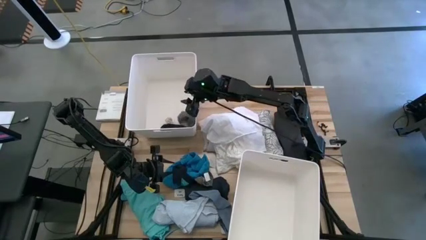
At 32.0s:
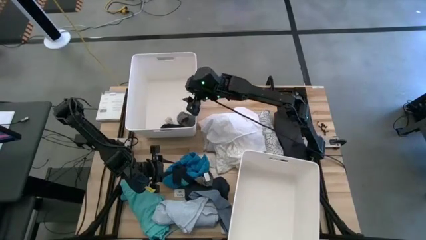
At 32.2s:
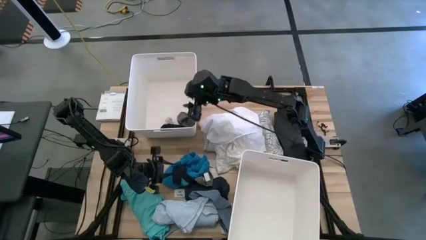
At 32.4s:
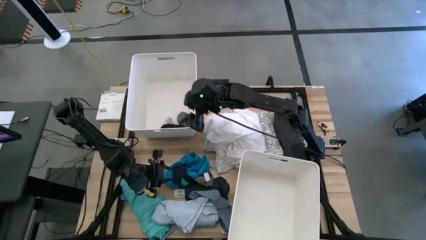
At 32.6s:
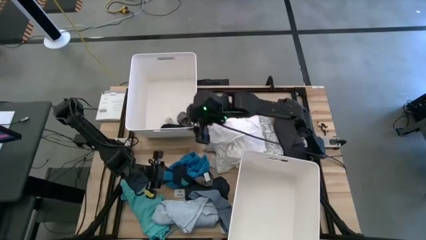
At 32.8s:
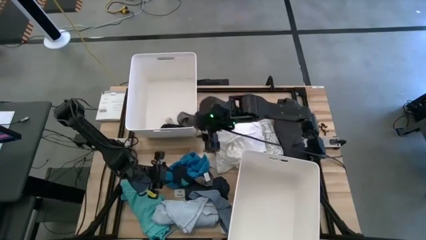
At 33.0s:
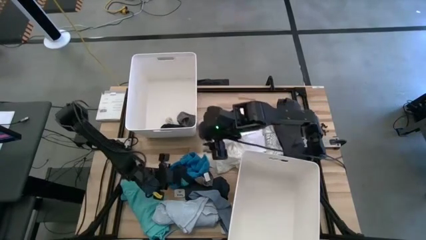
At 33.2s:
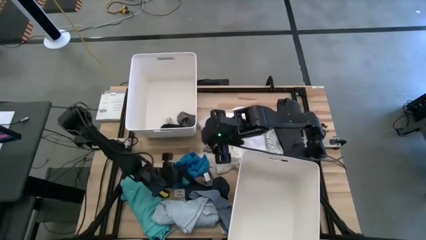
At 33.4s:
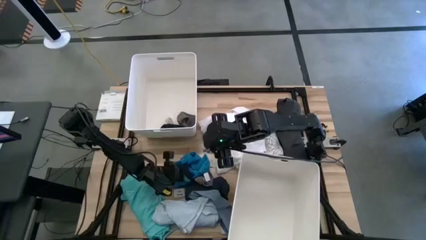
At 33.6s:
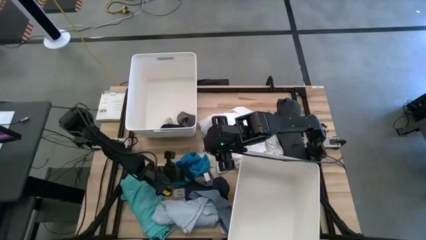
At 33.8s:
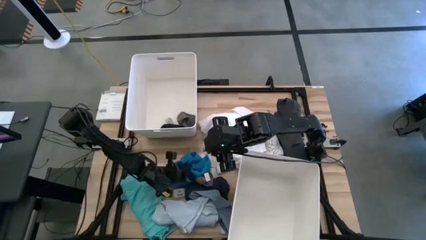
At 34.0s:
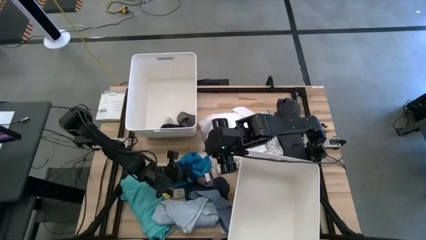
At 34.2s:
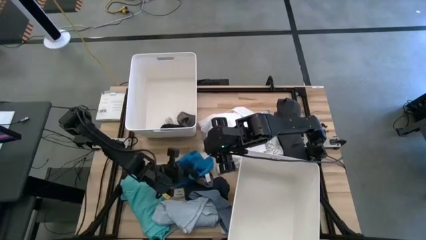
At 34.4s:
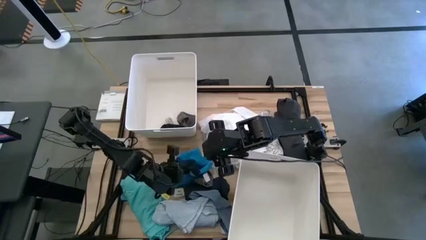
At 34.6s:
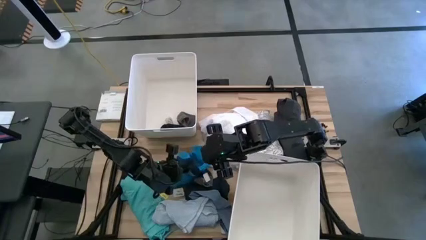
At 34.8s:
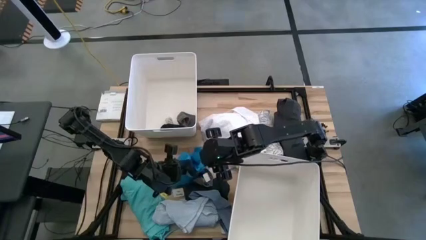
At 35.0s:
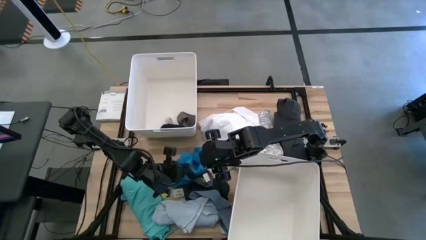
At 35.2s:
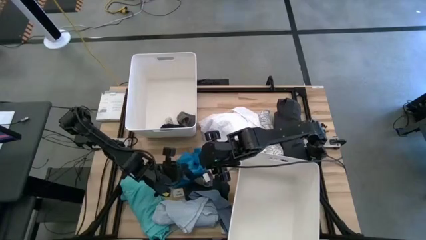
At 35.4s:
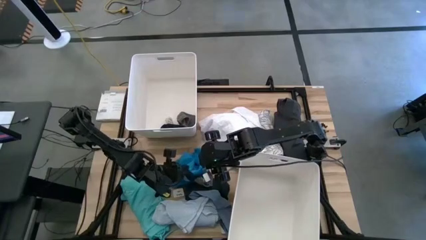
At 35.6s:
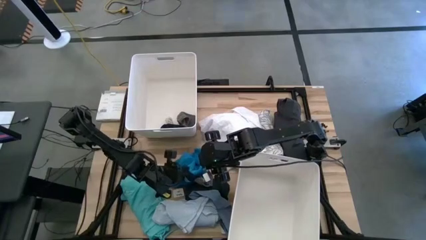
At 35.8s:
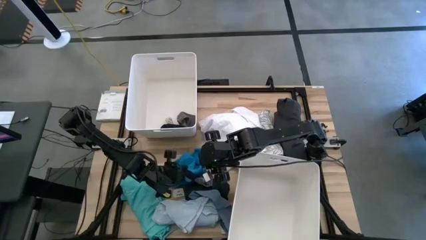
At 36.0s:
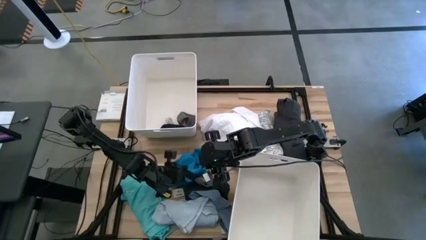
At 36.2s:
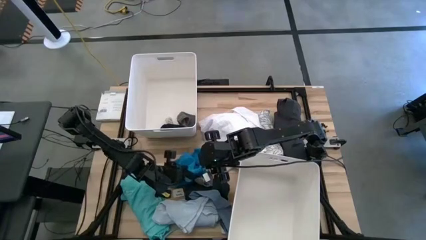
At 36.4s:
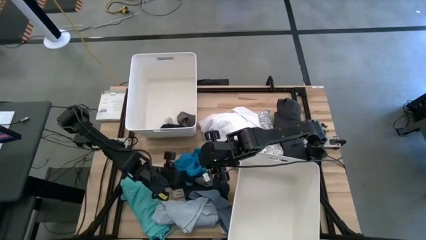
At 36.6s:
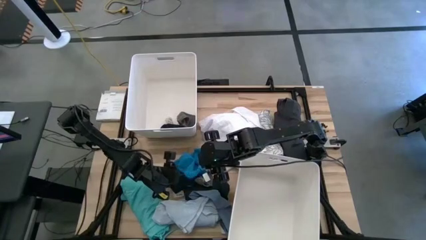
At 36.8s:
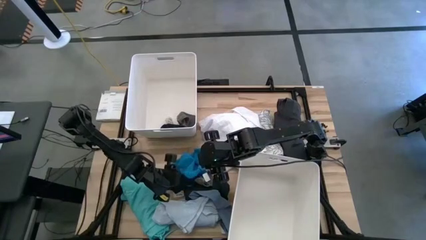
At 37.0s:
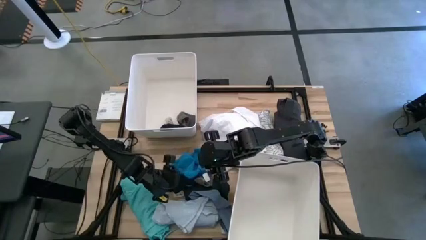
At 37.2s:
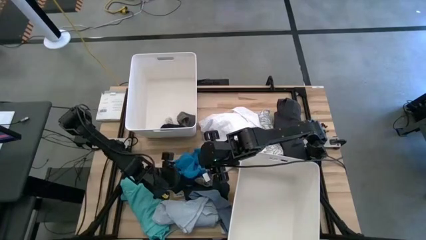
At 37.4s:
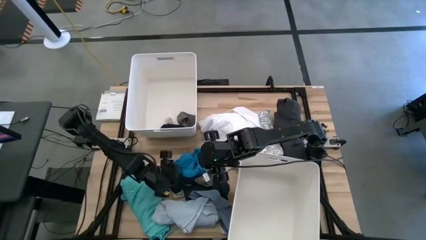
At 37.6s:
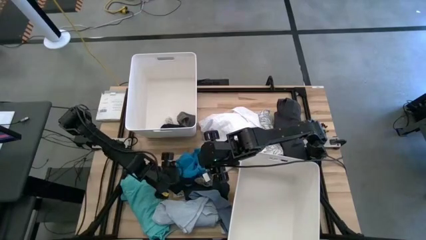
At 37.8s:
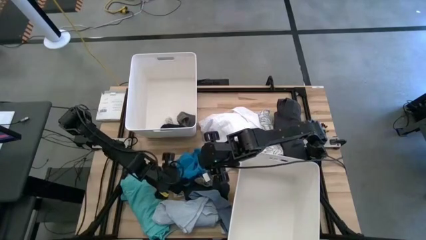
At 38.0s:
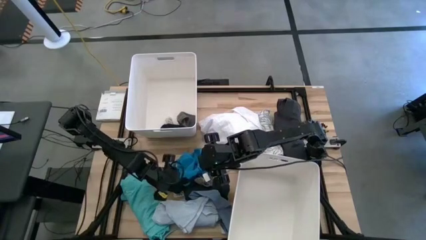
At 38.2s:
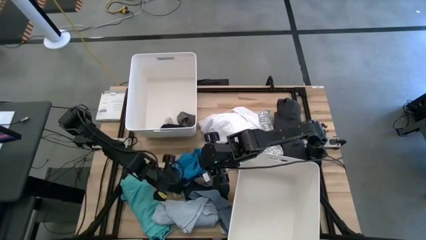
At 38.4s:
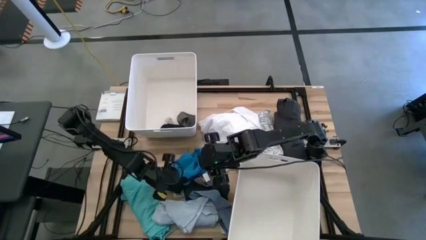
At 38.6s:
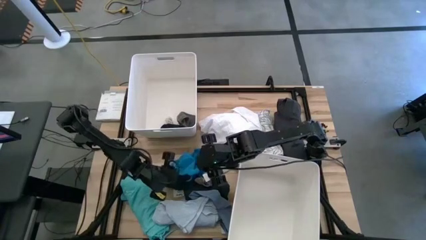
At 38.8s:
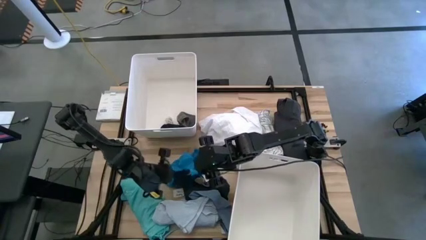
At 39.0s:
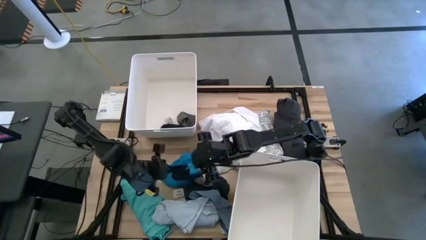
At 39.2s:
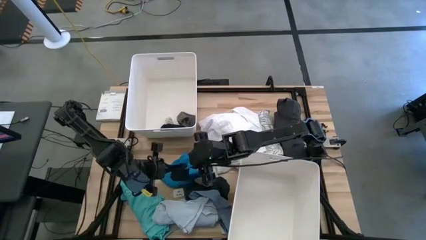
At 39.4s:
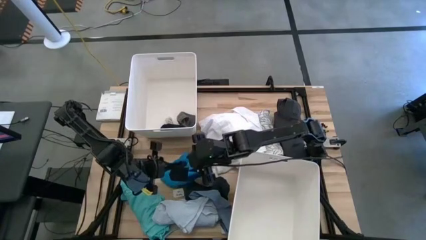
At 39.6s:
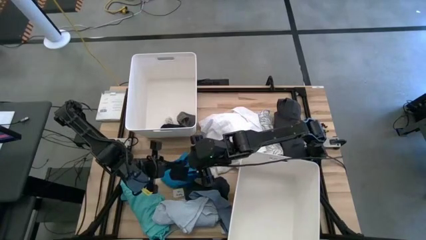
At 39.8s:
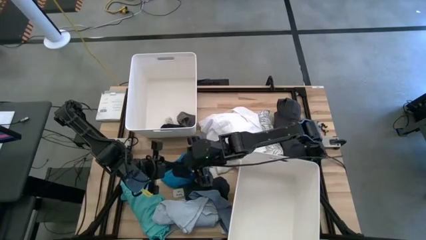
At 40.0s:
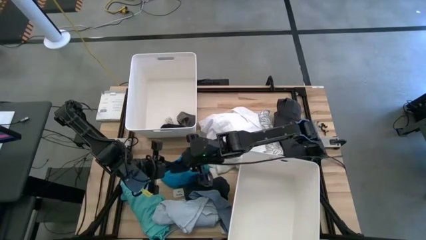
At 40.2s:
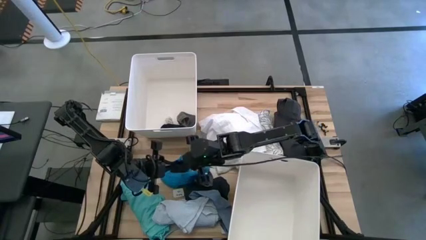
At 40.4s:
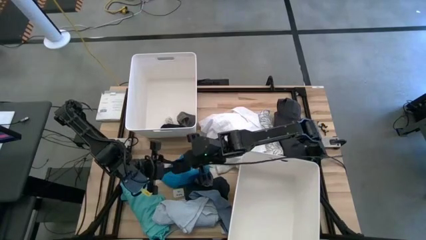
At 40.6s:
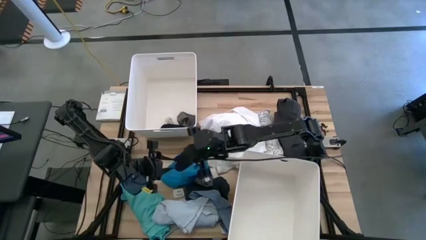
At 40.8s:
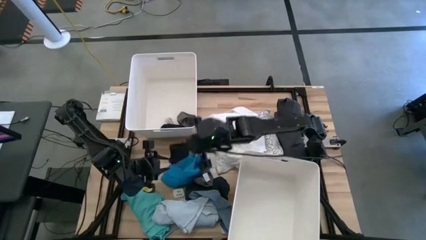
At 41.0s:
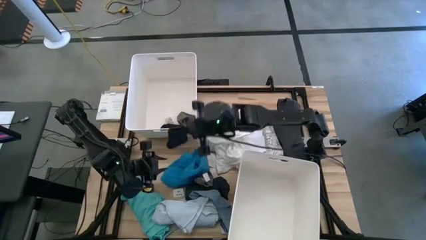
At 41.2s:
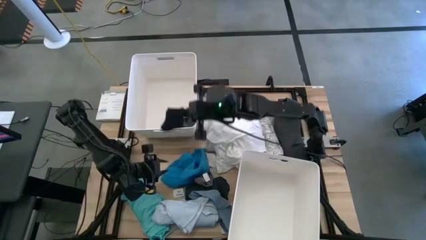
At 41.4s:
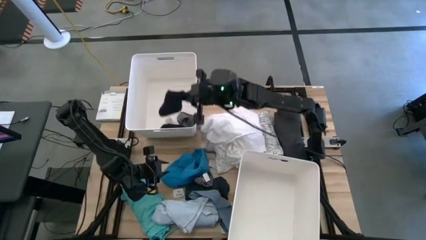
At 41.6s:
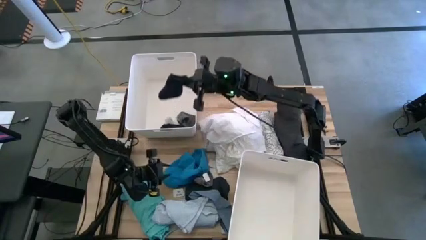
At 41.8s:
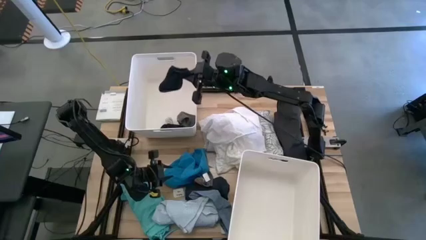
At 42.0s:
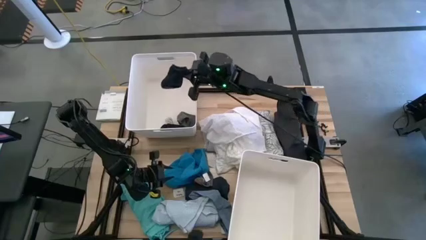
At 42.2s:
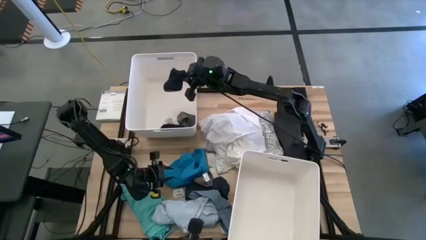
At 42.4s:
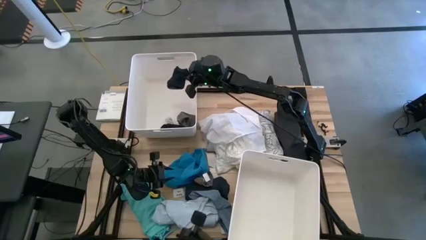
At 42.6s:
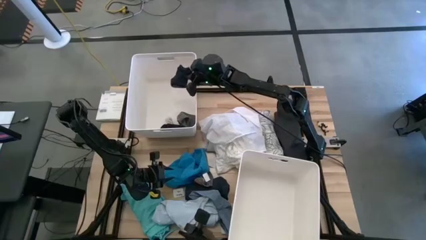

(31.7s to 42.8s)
Task: Sort clothes
Put the blue sock into the top white laundry bin

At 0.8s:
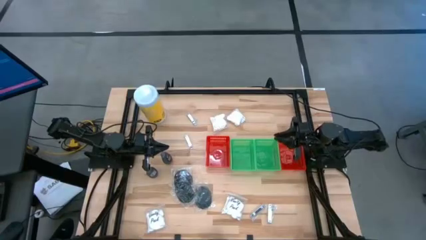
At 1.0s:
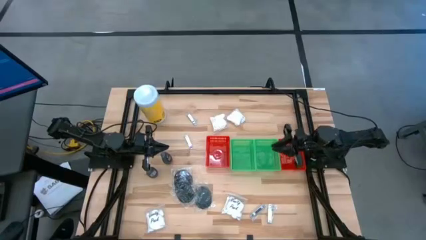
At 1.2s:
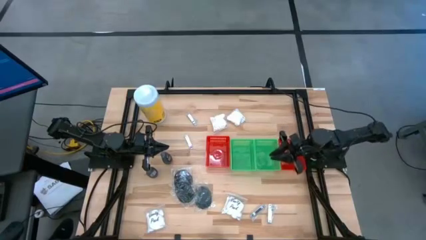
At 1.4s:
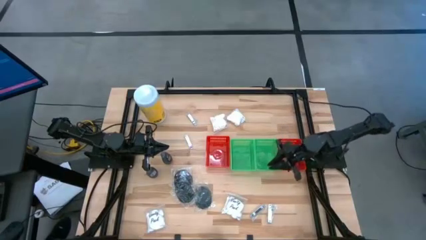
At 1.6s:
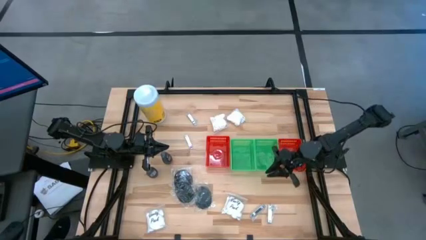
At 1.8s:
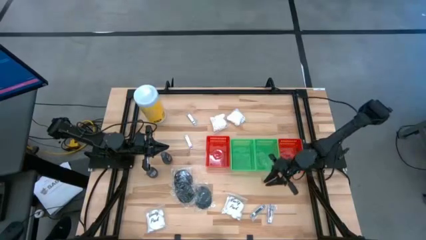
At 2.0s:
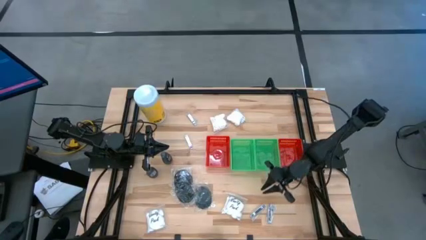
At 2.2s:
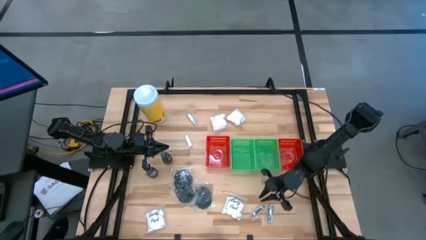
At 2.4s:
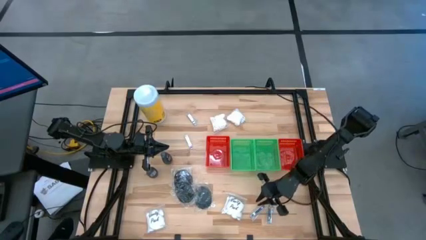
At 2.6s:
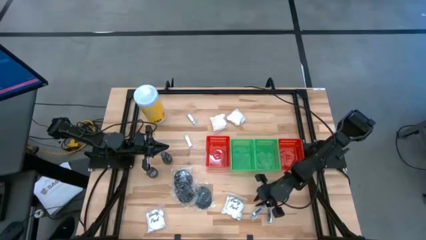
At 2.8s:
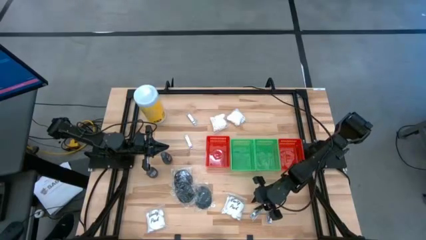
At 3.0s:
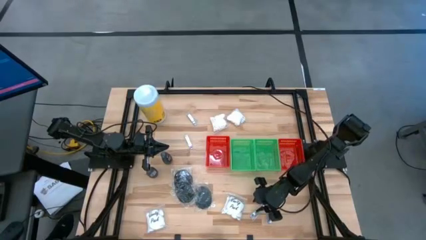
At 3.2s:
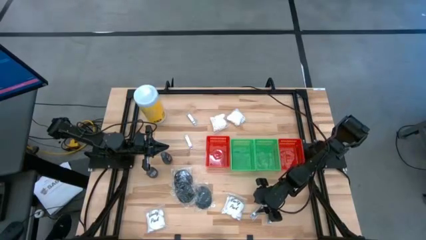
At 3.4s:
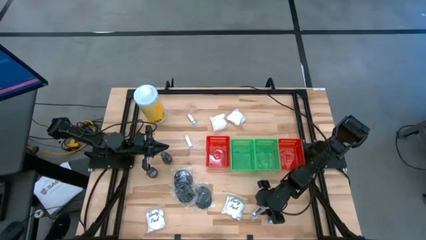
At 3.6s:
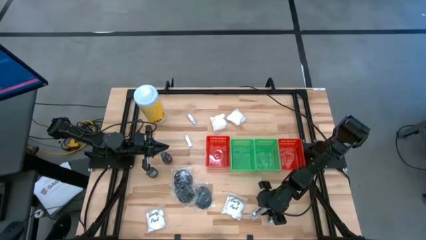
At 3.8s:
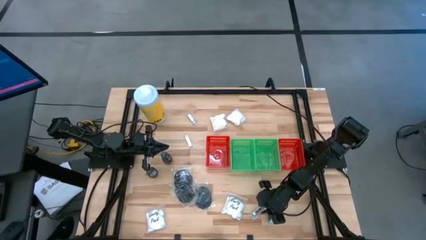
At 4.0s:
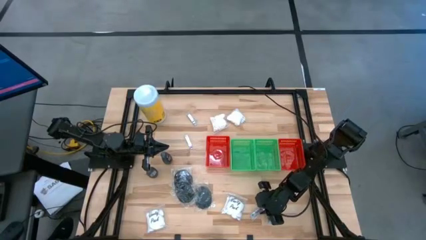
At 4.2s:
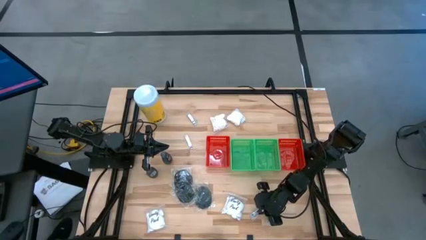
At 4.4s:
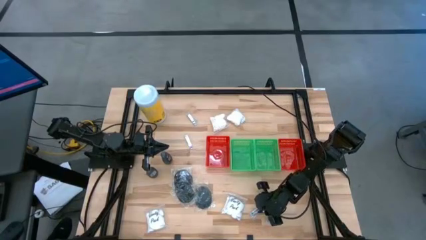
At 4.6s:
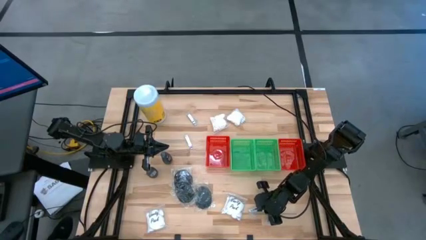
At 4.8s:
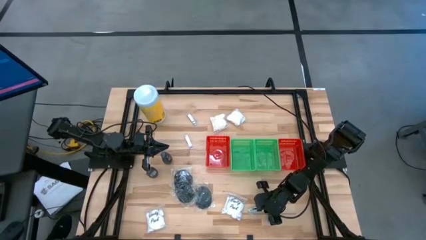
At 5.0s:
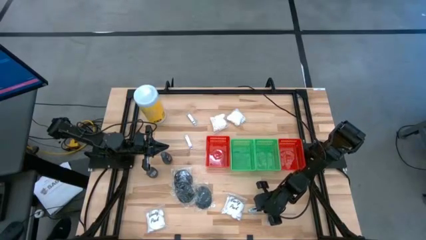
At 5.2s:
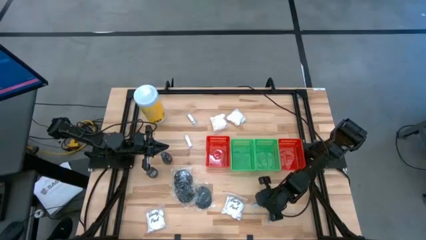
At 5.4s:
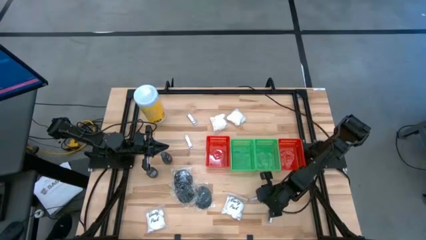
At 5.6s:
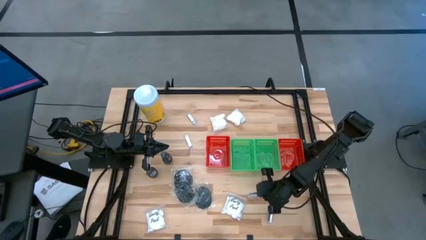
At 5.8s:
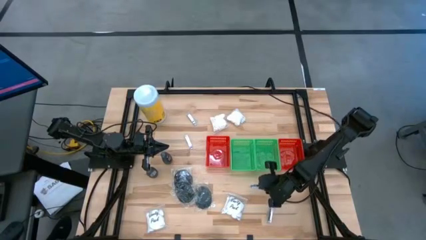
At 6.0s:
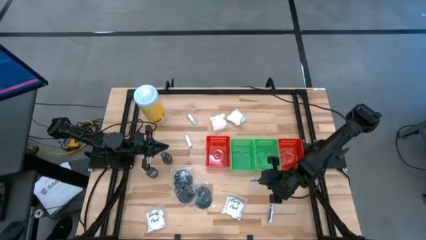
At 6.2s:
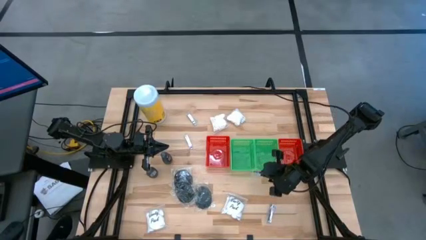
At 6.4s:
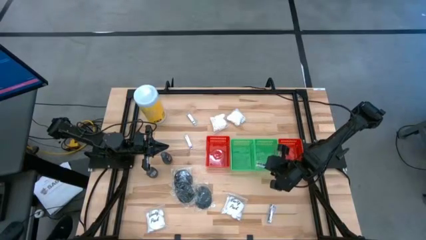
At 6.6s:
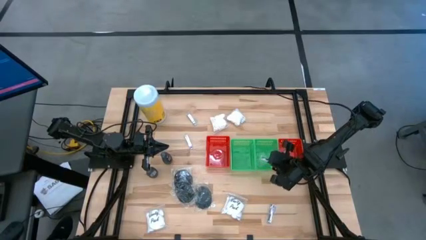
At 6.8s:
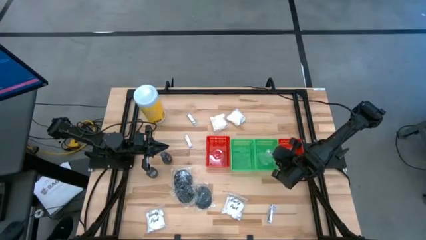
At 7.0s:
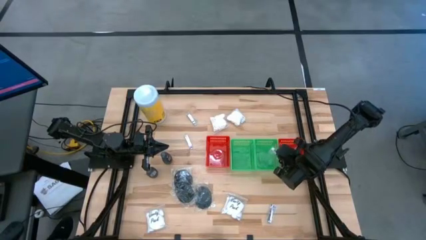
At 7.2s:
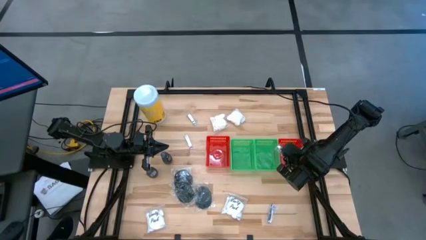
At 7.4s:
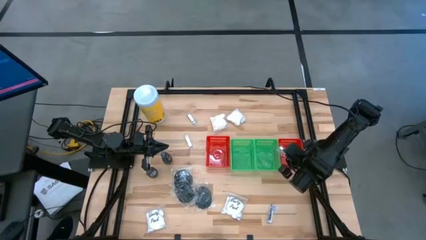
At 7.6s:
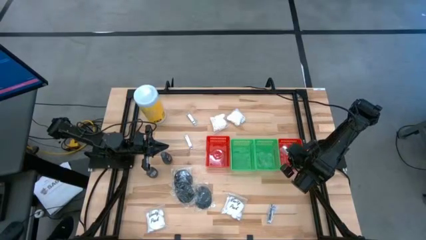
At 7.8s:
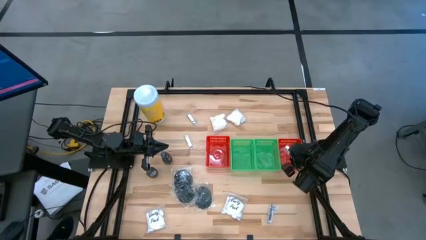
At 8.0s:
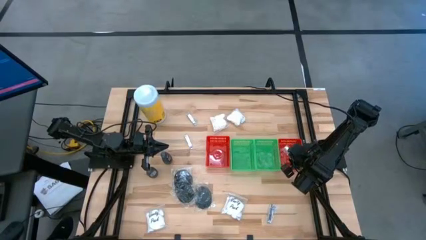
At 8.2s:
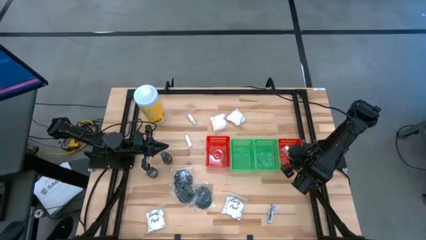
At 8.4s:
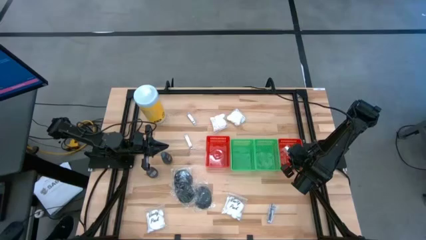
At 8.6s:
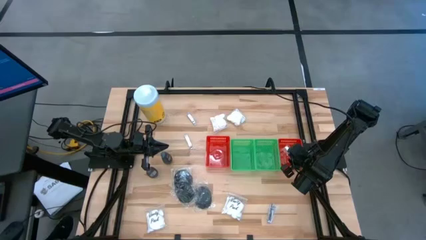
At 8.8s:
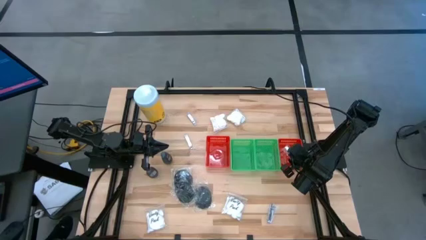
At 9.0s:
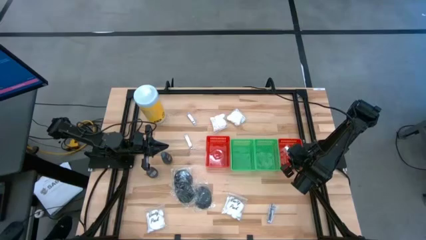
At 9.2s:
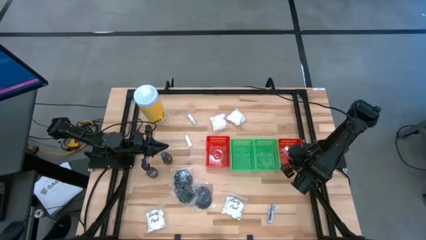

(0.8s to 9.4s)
Task: Pick & Place Travel size toiletries
Put the silver nail cutter into the right red bin
